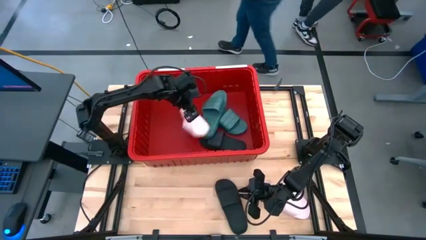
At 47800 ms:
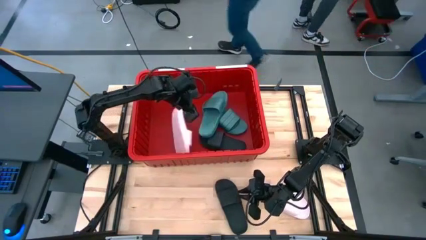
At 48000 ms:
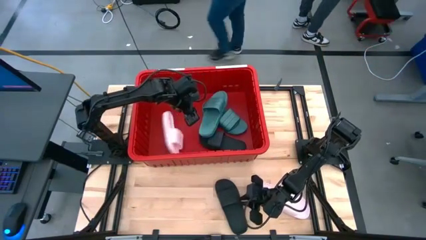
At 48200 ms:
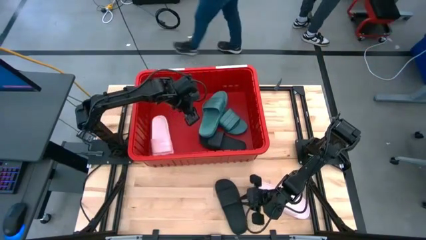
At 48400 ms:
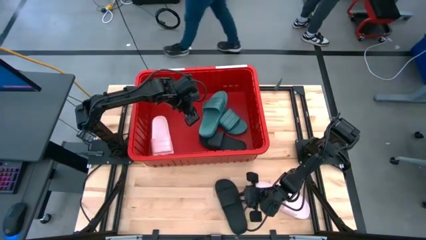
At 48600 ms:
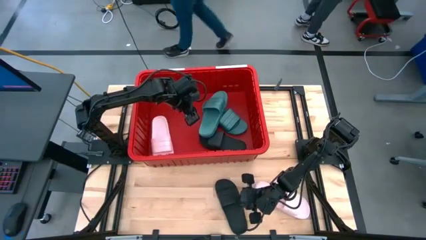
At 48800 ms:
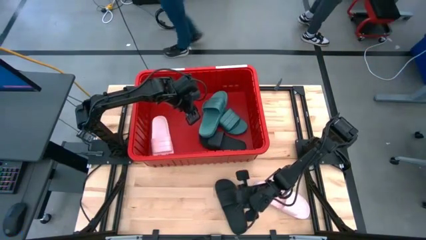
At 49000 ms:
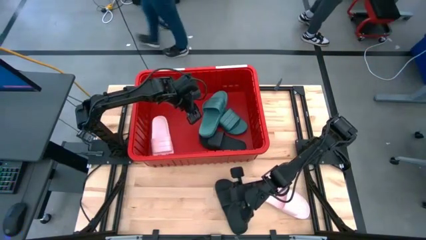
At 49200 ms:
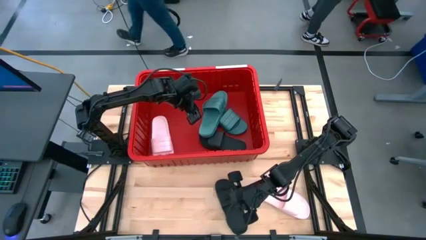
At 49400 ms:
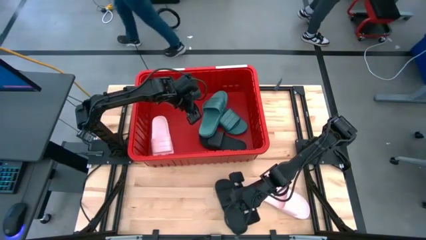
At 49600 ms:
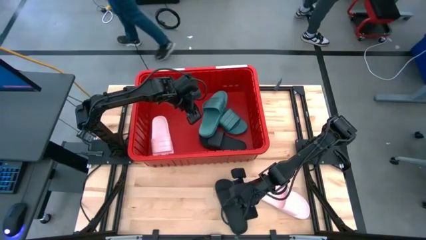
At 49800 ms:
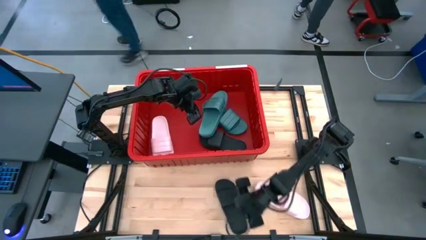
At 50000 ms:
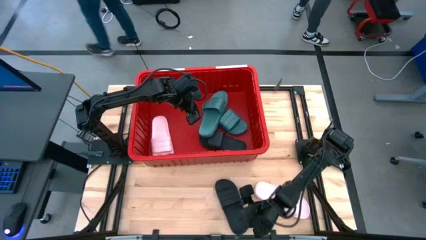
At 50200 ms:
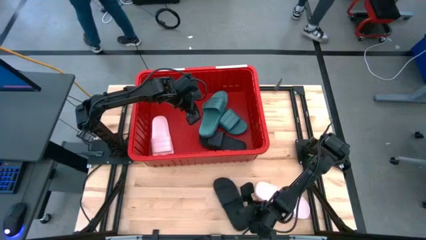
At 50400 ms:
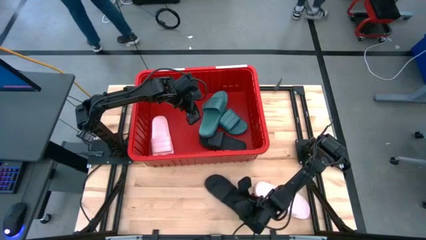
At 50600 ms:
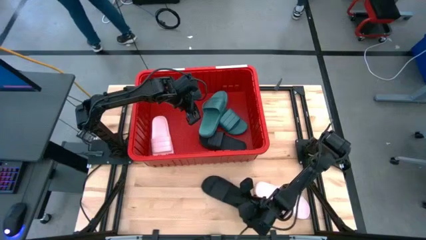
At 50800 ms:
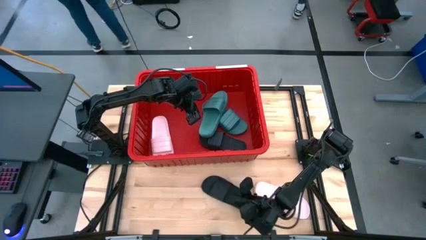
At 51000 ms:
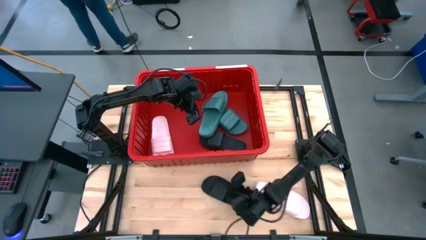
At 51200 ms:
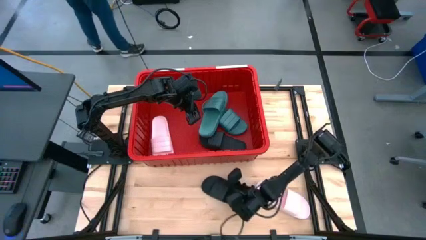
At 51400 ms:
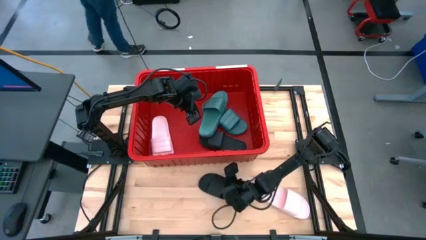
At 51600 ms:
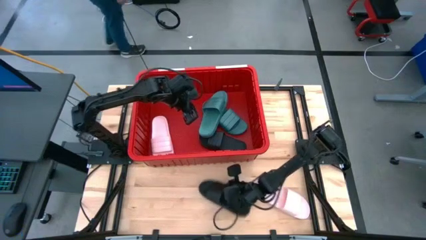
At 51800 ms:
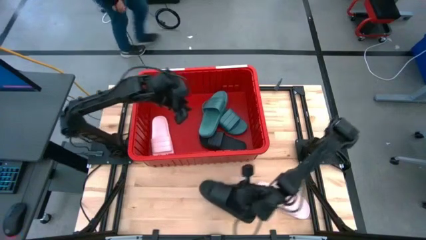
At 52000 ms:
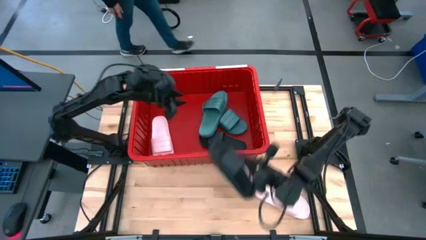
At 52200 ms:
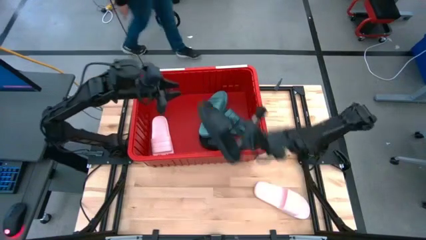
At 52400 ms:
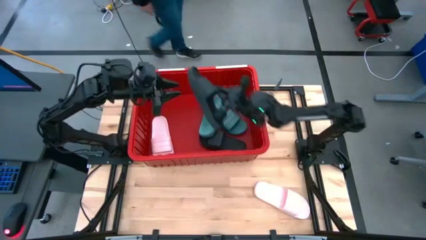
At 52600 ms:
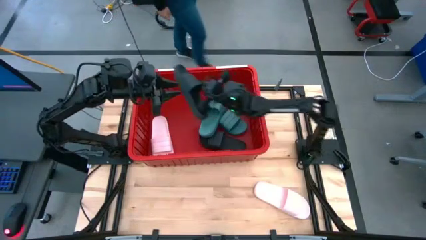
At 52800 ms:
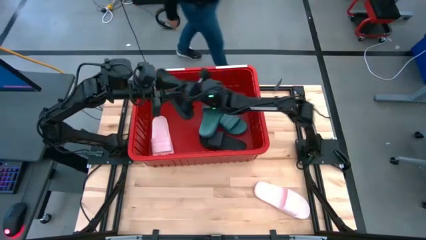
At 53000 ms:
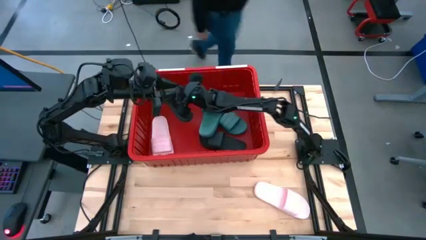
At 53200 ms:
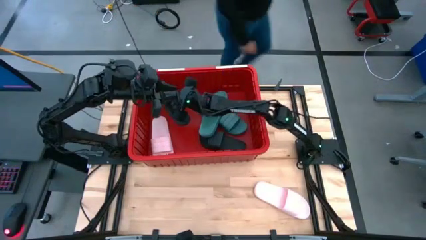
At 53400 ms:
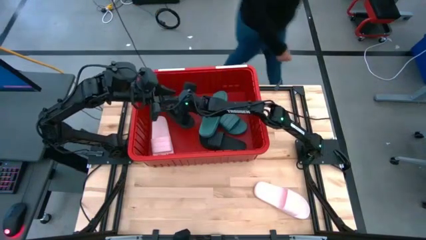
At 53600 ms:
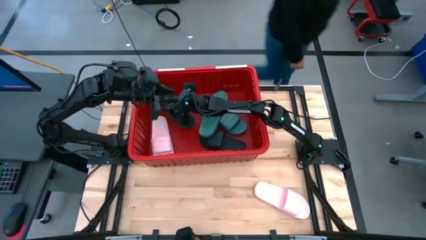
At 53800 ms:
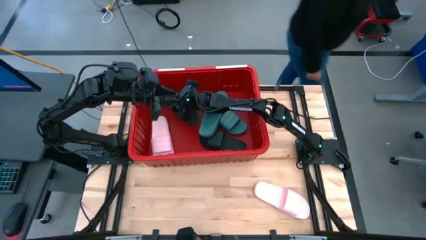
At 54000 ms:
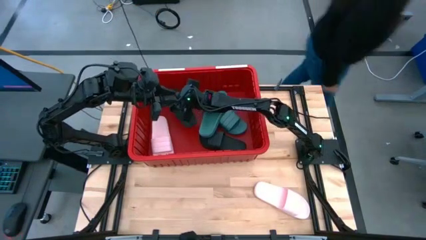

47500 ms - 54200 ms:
Task: Pick and place slides into bin
Put the black slide into the red bin

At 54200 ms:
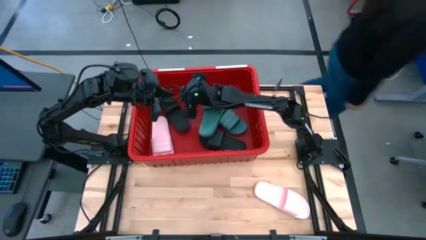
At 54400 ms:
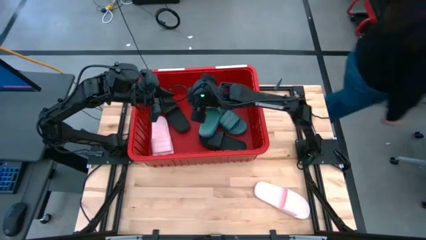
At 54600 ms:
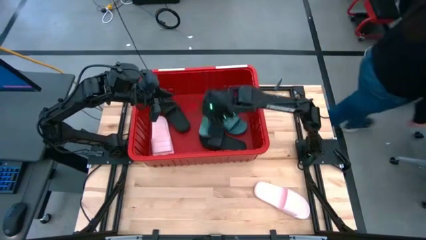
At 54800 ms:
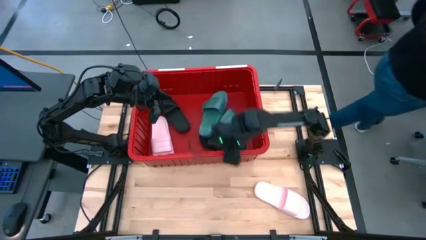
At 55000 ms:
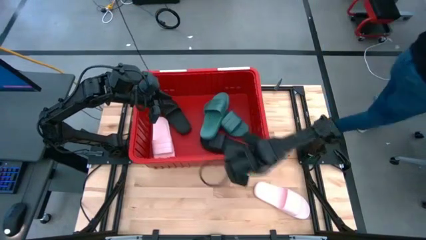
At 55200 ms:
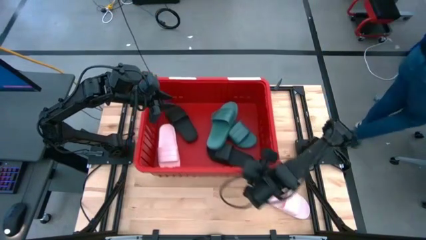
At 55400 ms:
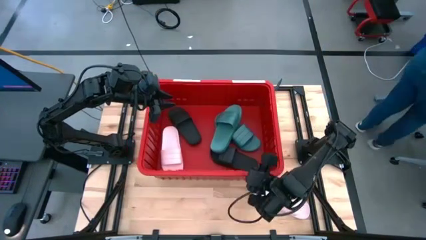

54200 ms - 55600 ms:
Adjust the red bin

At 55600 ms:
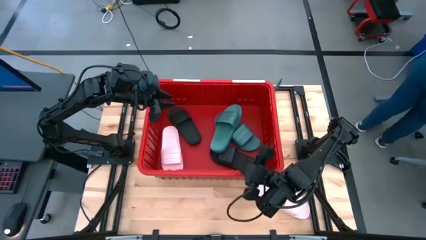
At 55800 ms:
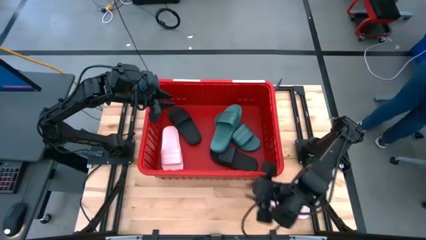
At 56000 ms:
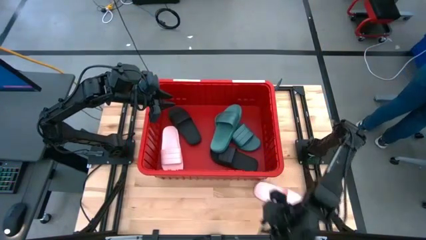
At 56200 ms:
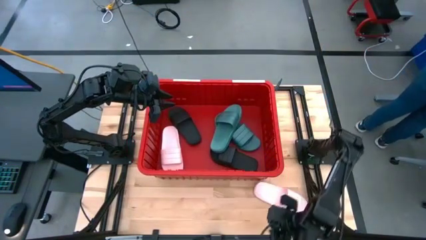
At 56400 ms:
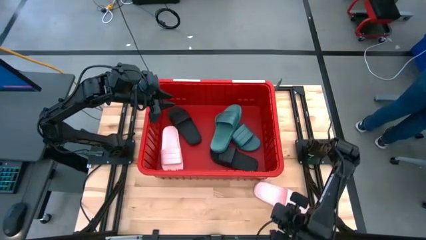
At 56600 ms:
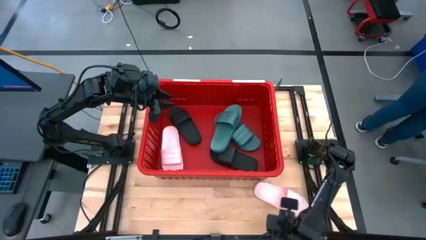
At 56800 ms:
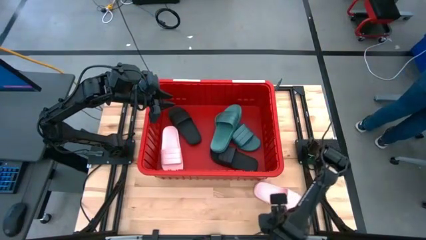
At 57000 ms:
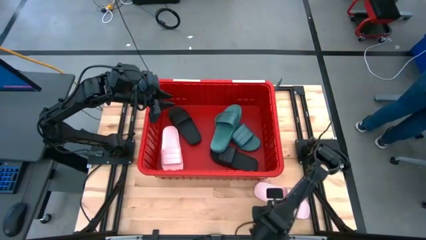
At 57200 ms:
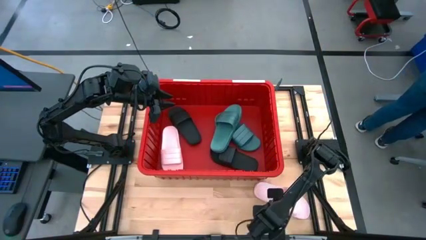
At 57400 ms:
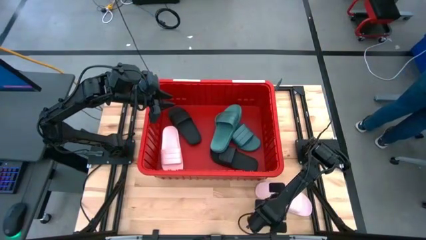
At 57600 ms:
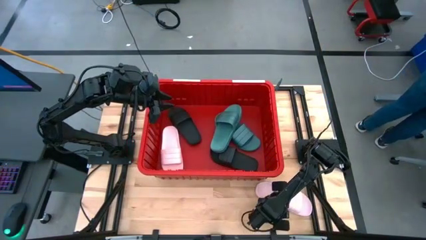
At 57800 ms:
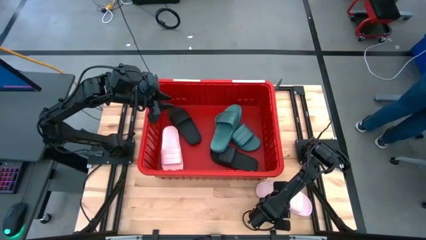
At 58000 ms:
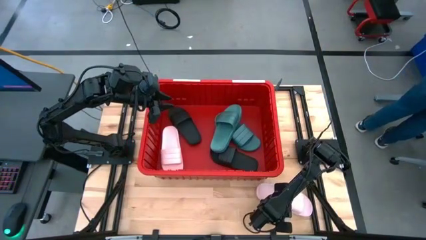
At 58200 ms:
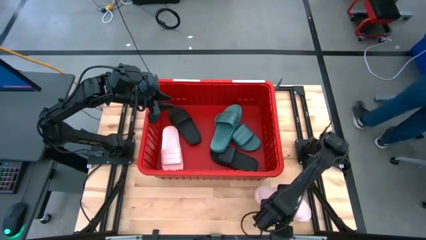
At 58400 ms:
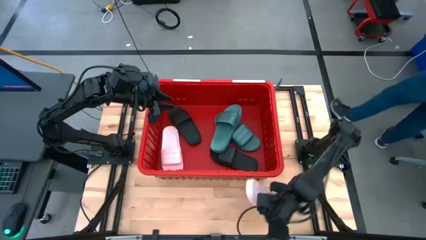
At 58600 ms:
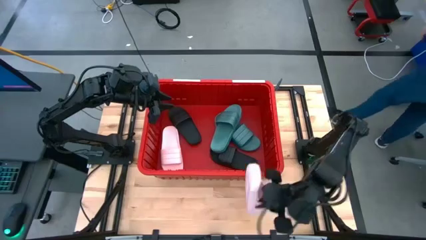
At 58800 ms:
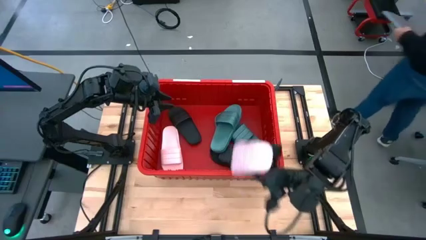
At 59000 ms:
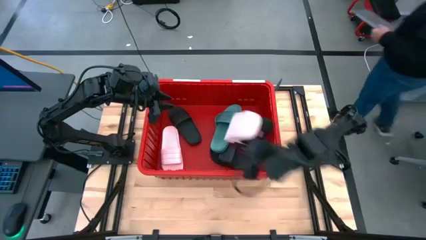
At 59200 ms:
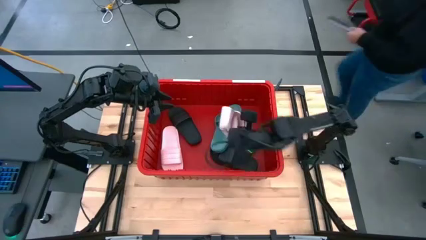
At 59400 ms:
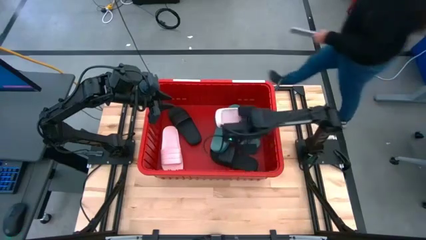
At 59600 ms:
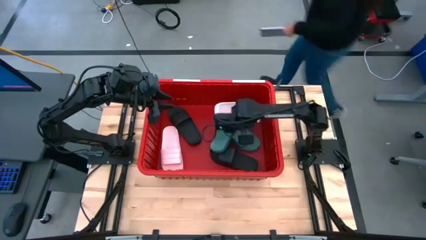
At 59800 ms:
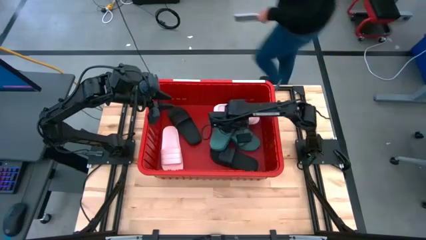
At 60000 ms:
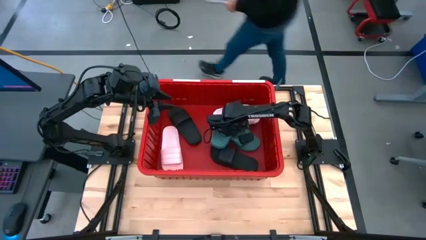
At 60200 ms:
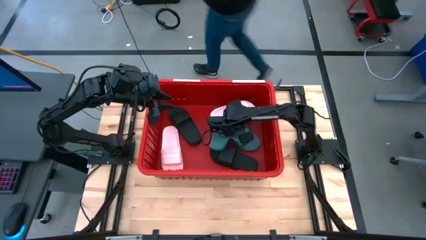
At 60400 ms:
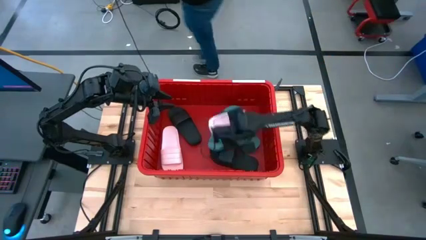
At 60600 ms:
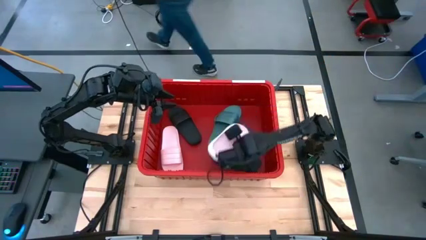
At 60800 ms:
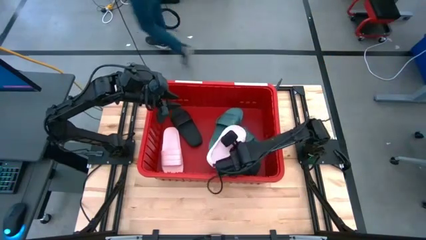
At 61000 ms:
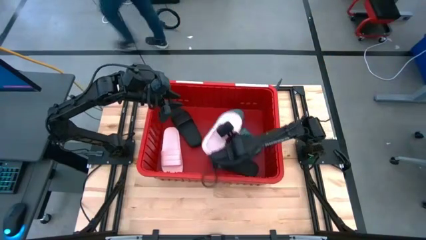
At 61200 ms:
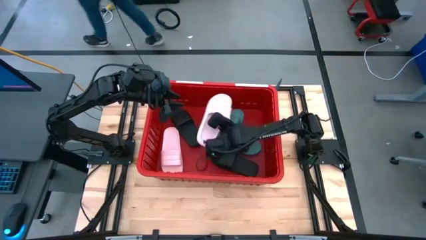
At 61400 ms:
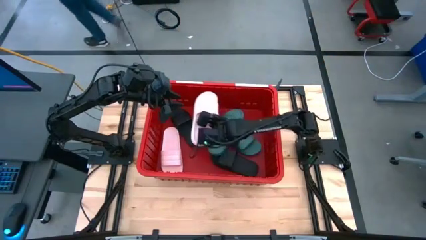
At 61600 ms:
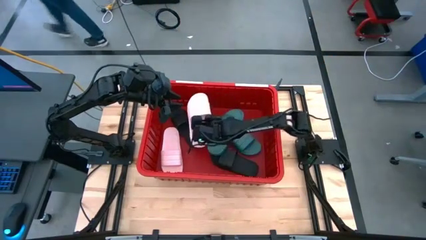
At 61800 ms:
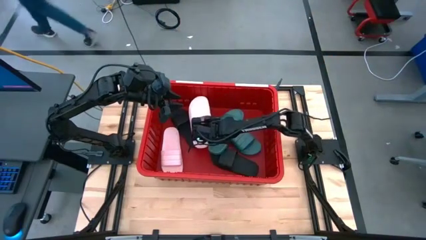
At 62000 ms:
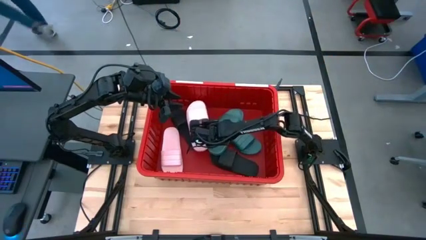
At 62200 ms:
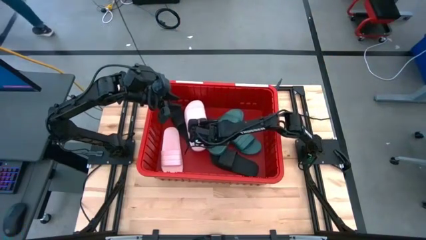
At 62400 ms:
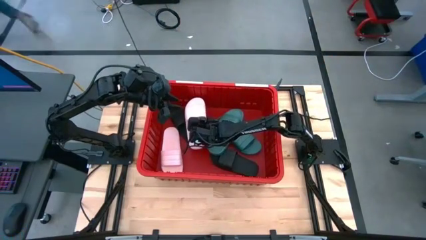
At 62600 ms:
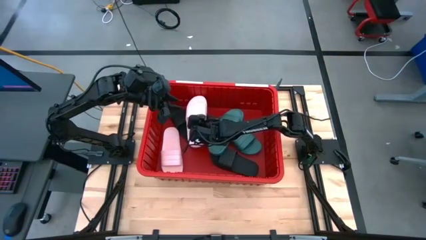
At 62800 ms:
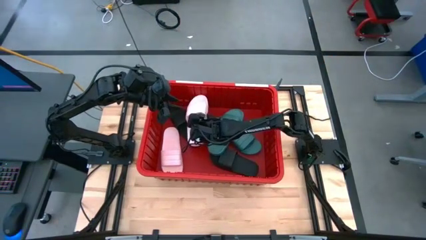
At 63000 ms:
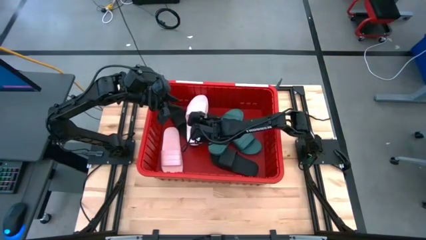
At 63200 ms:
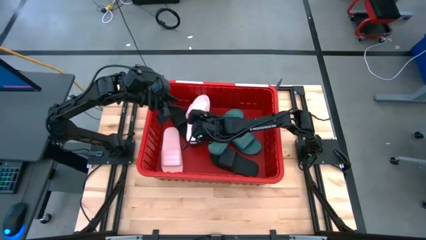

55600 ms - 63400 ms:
Put the pink slipper into the red bin
